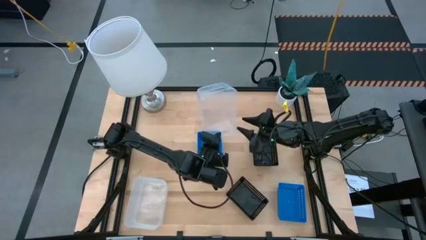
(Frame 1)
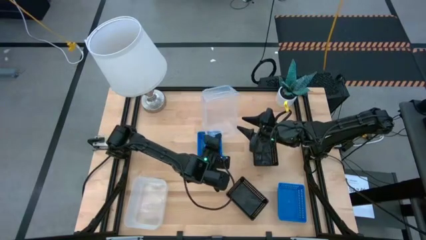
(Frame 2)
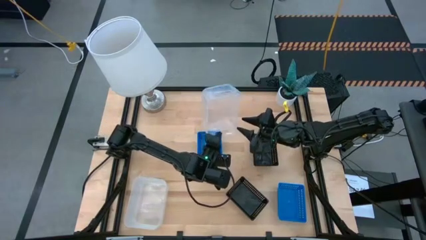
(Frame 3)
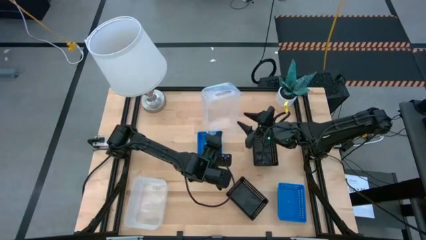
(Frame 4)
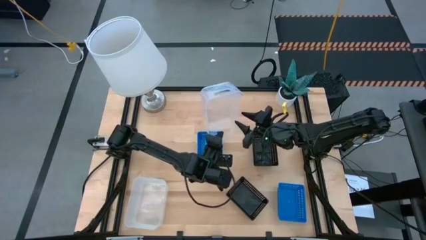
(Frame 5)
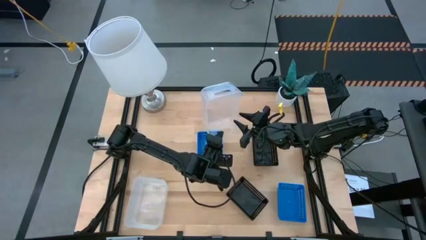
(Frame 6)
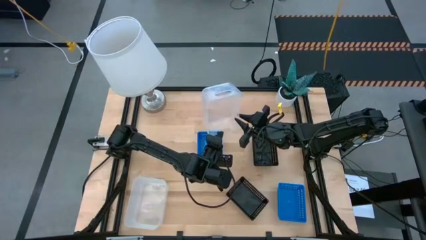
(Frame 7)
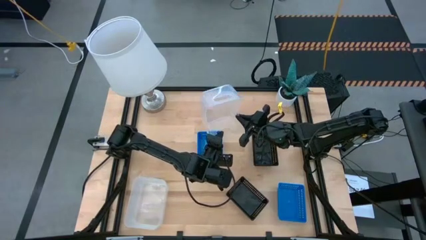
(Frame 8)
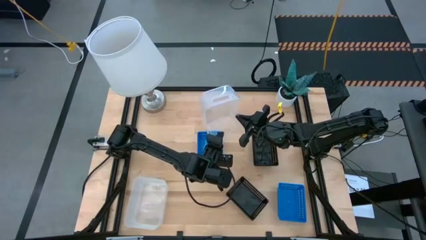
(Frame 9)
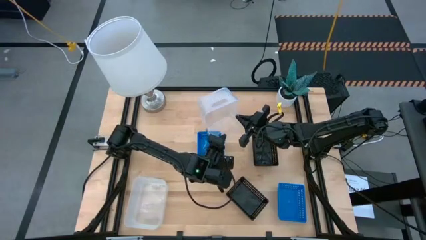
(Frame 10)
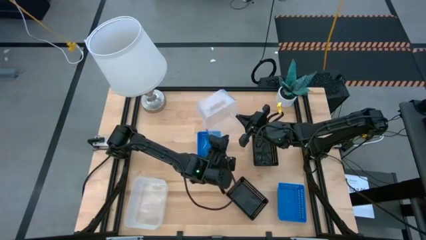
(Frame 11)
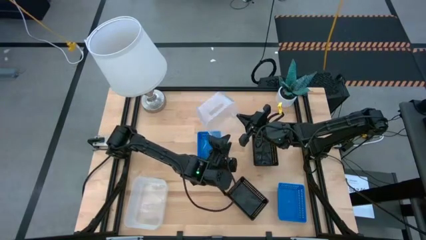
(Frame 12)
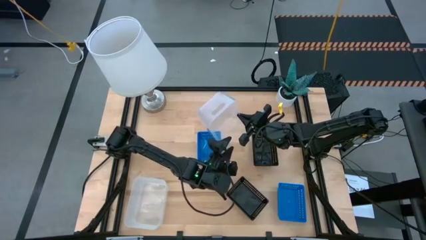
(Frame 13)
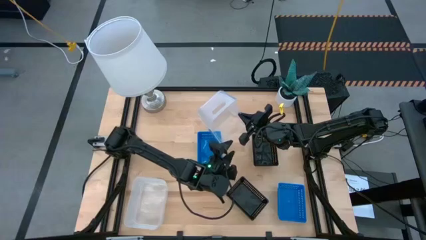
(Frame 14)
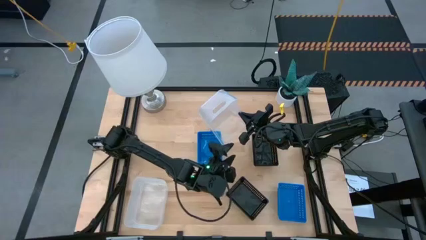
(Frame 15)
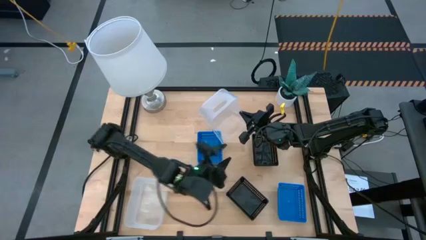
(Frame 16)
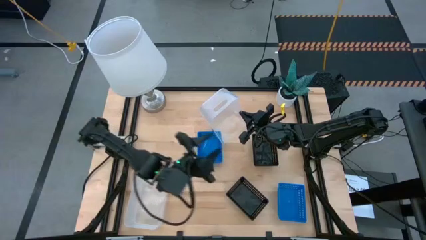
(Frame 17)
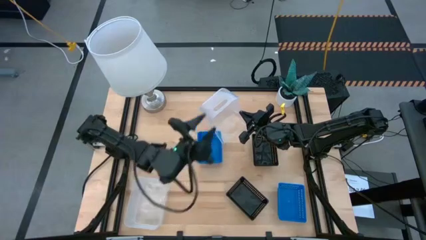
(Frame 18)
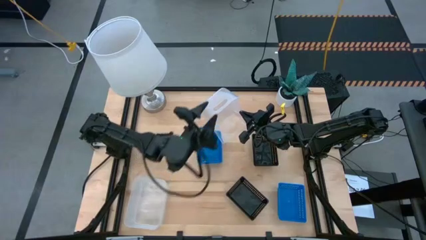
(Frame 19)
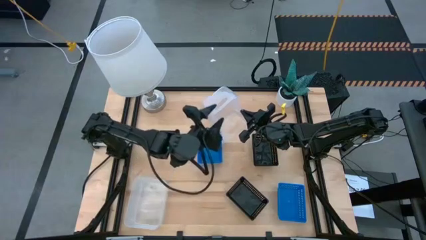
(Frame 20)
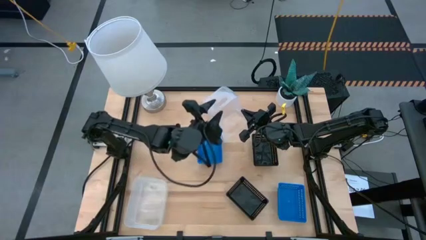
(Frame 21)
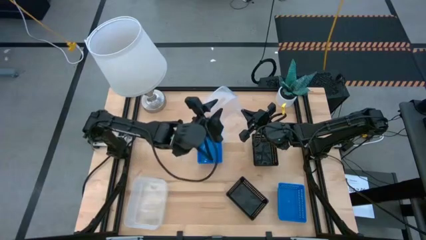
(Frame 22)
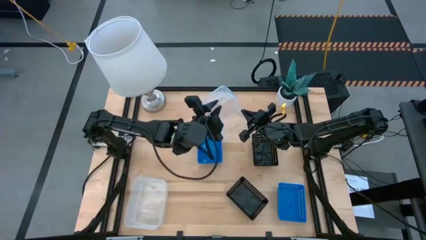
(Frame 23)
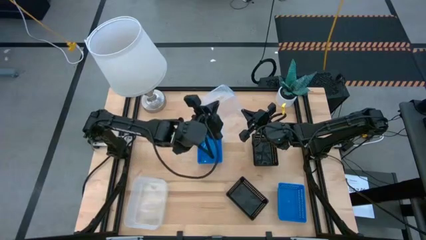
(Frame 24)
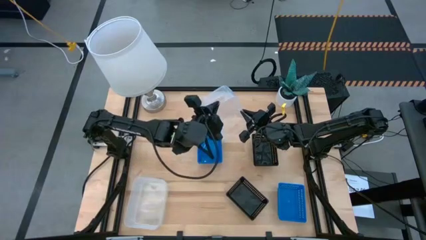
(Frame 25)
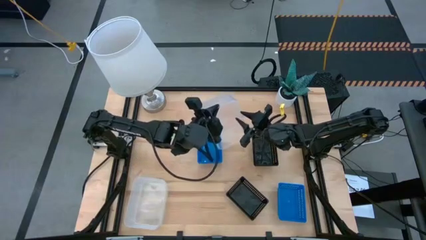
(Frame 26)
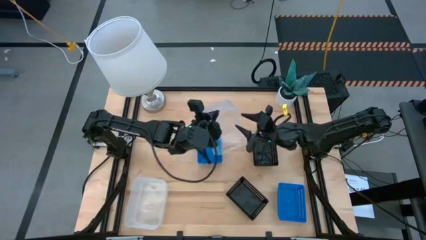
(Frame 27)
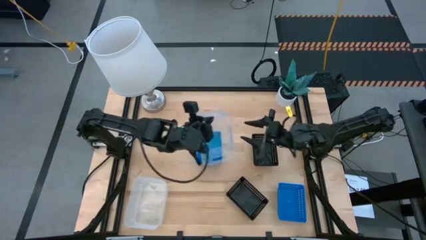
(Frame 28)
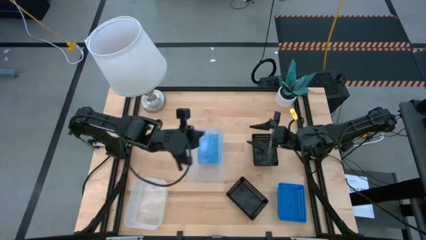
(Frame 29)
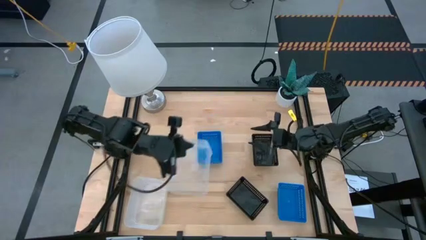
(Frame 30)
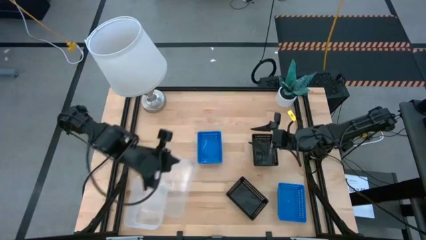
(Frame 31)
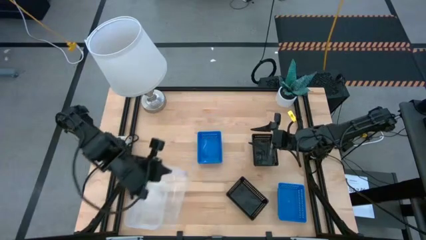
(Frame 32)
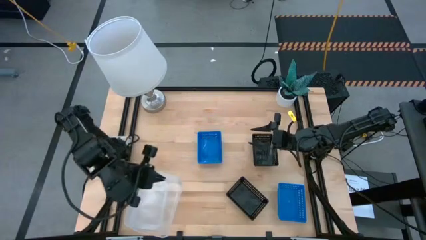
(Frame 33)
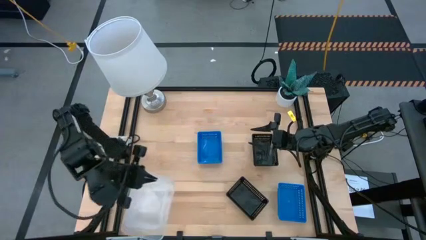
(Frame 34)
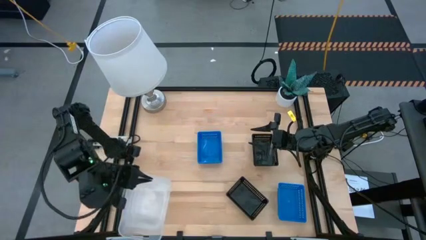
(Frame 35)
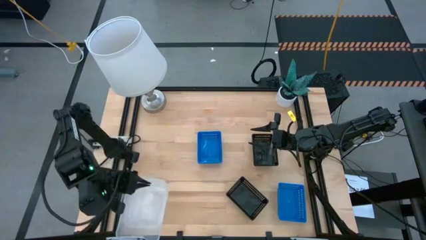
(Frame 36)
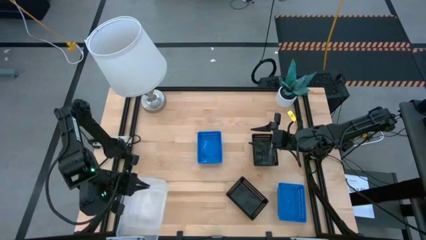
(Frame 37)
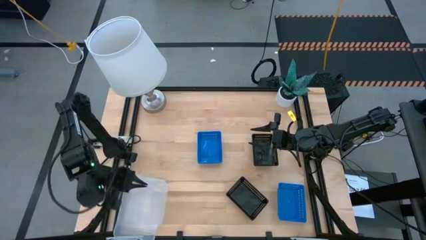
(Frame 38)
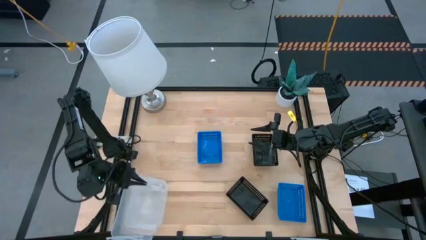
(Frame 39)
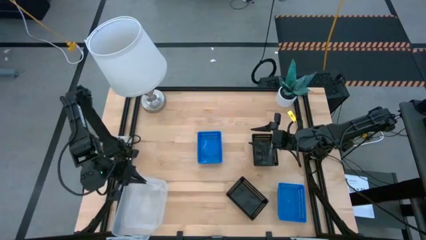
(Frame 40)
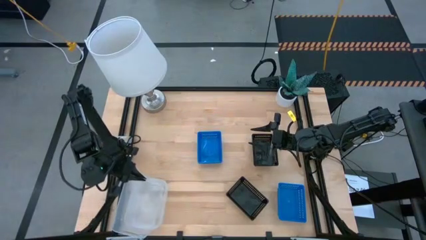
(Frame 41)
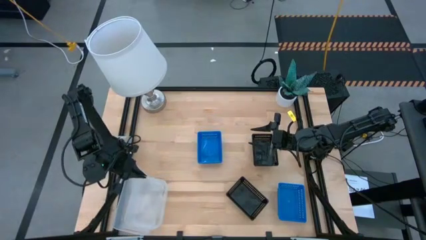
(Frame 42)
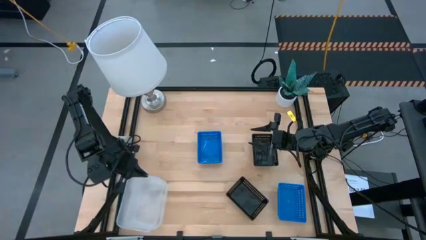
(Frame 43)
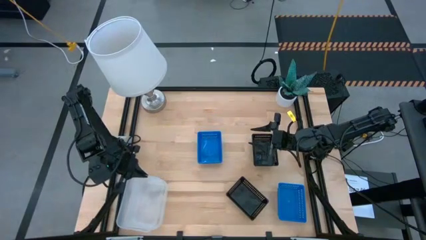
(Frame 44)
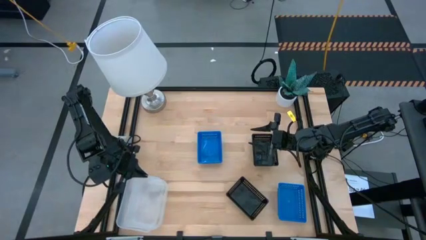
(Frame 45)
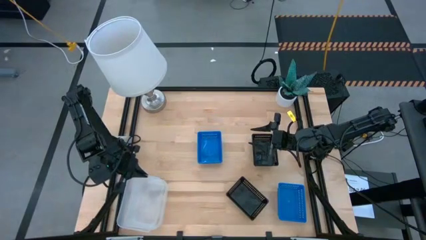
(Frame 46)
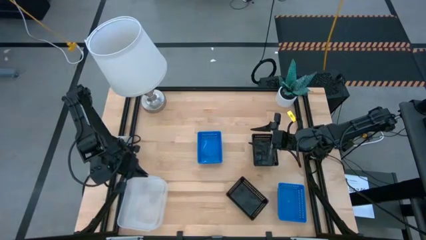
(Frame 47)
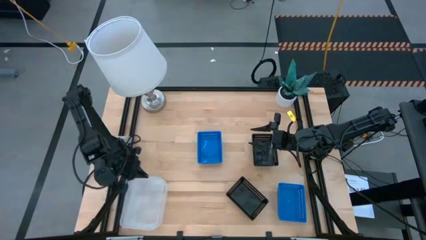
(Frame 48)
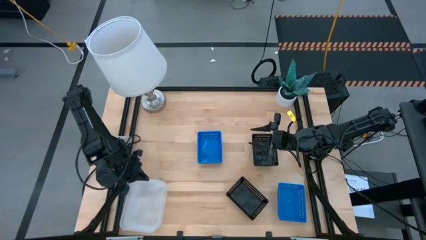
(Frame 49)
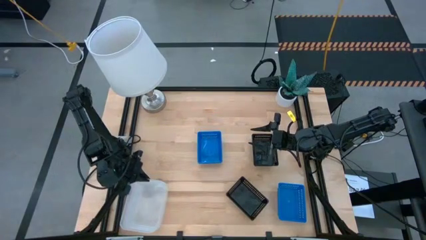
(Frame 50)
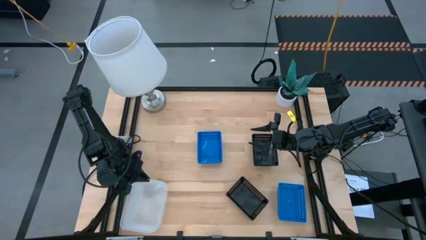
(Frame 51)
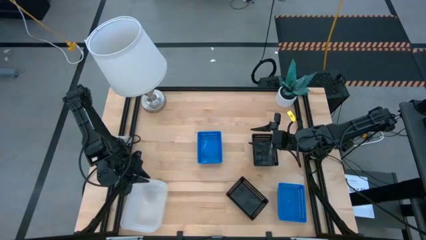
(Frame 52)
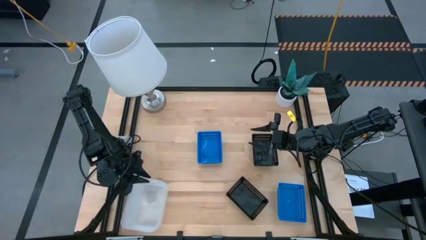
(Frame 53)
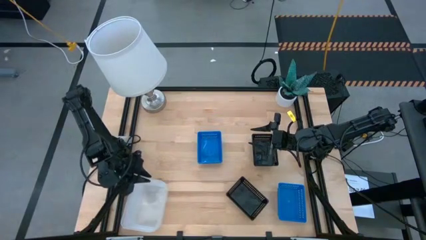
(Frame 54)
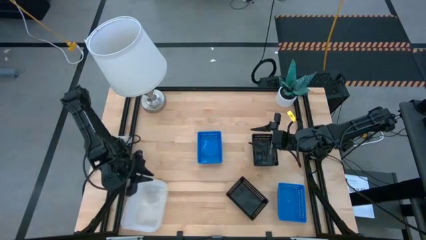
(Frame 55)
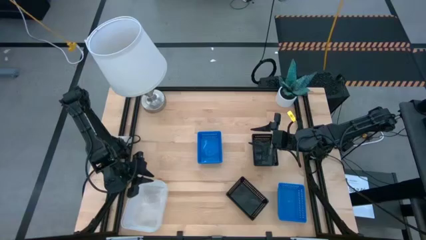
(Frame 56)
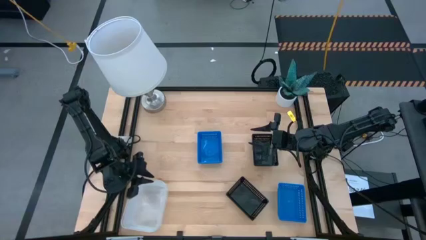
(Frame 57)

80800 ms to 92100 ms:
Stack the top transparent bin on the bottom transparent bin
